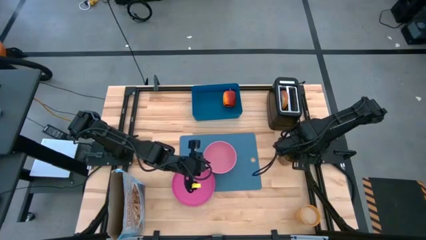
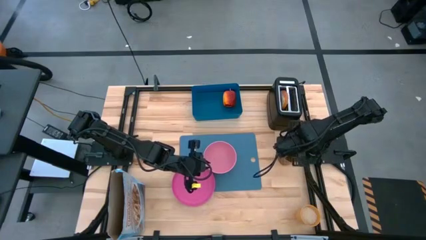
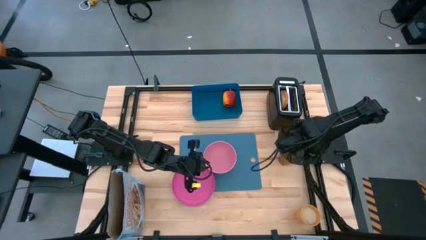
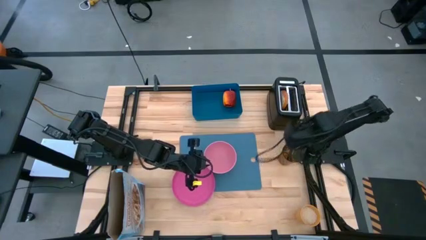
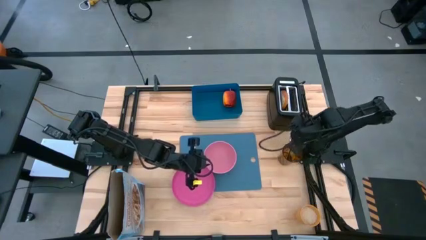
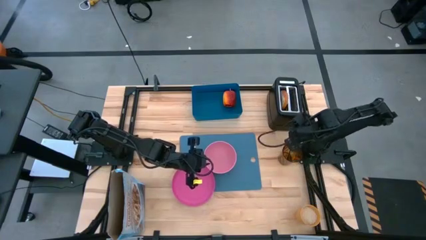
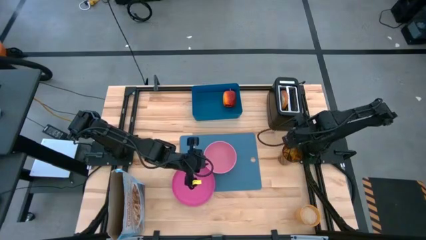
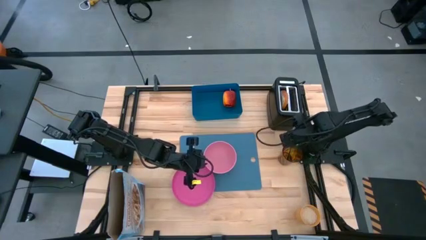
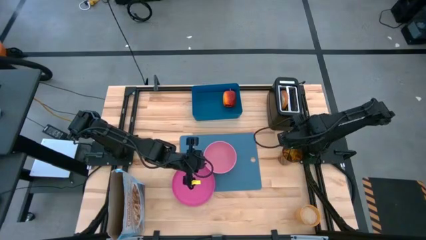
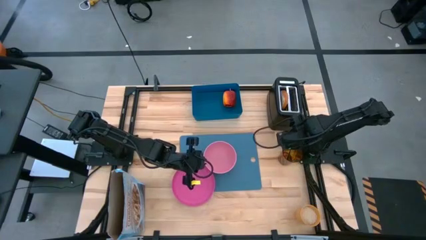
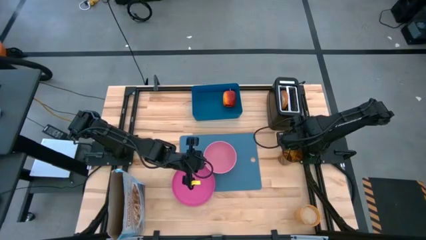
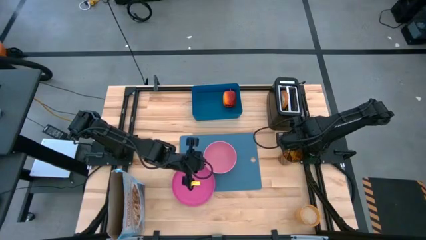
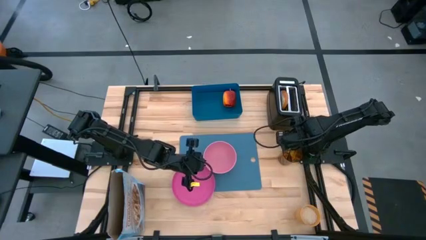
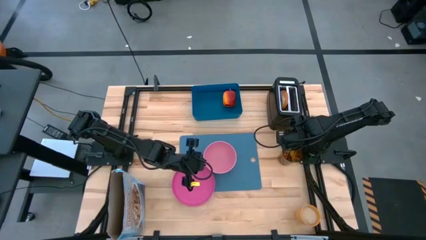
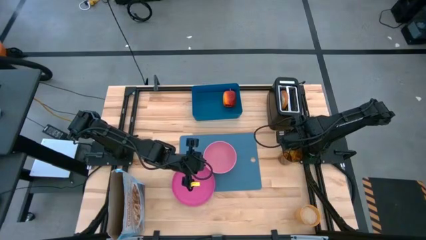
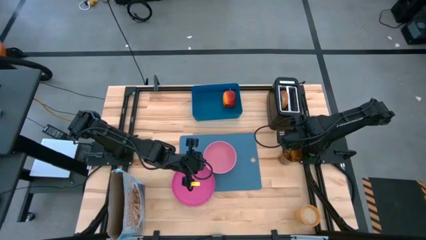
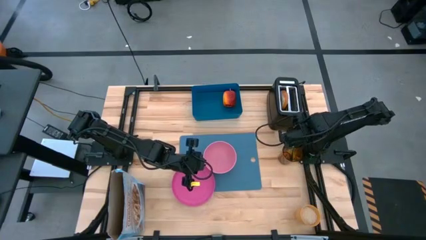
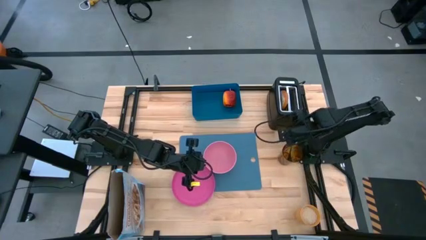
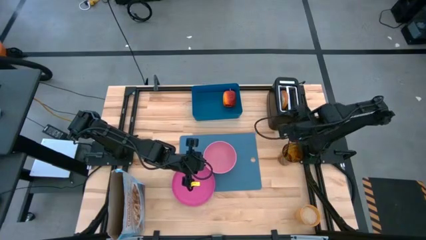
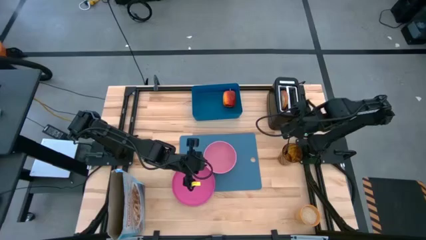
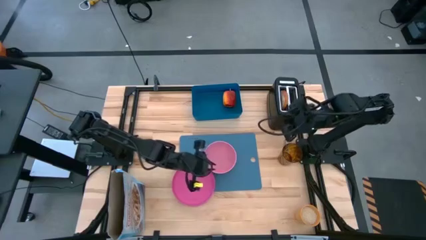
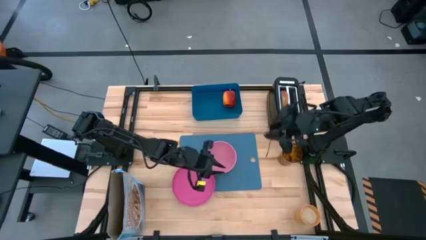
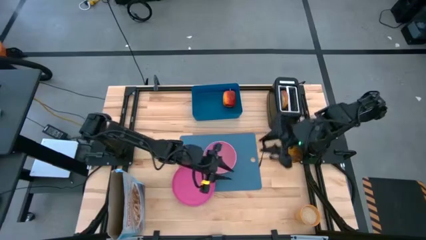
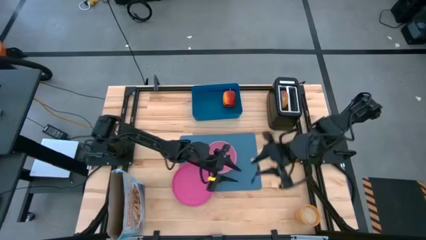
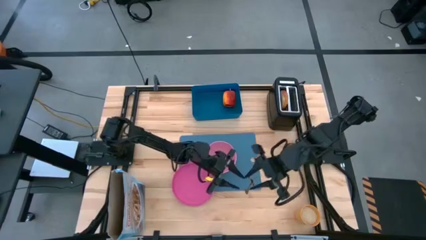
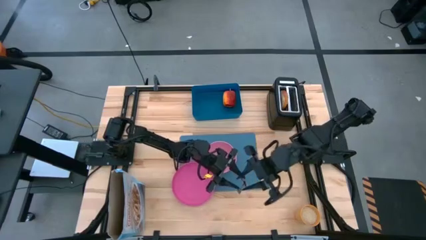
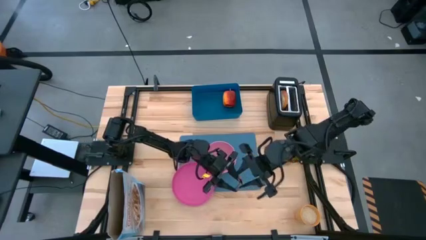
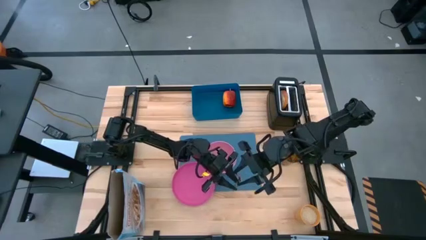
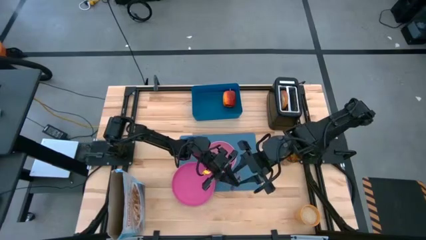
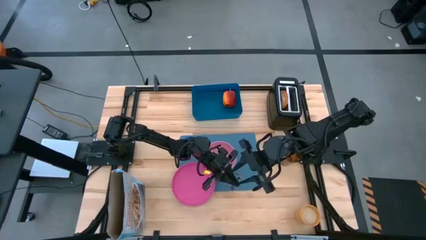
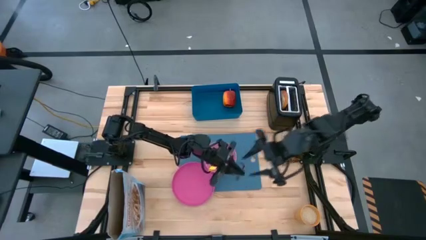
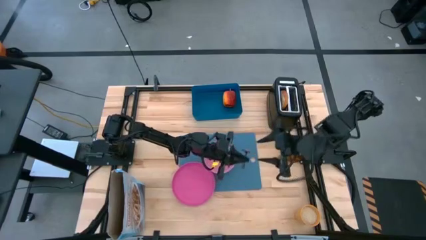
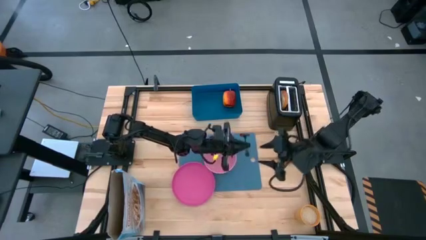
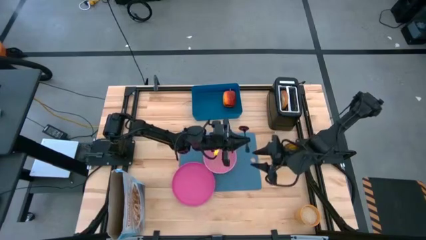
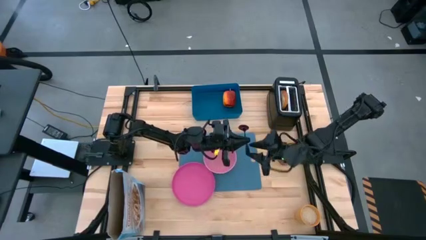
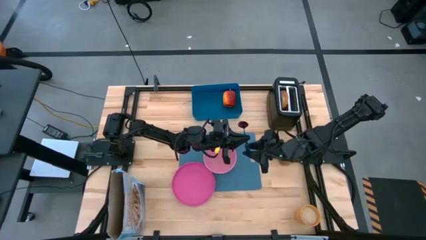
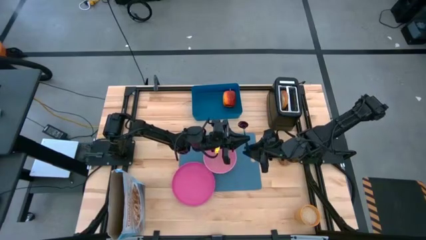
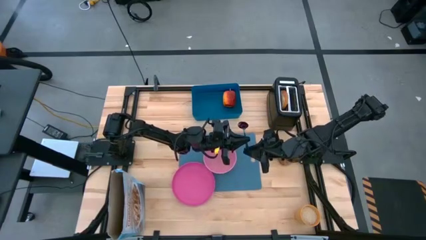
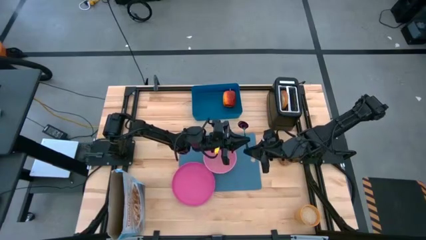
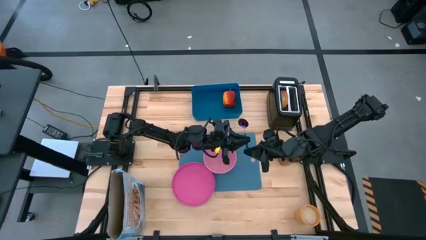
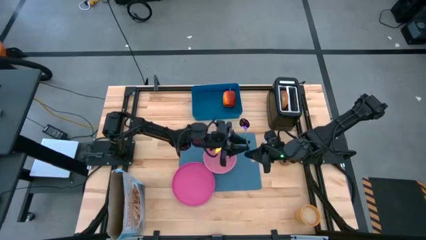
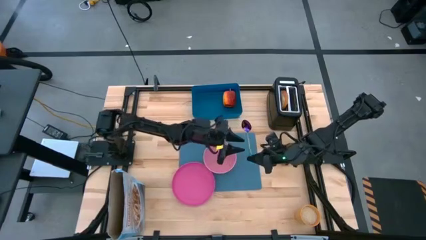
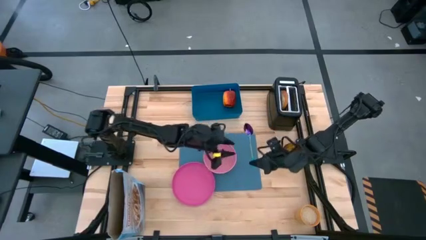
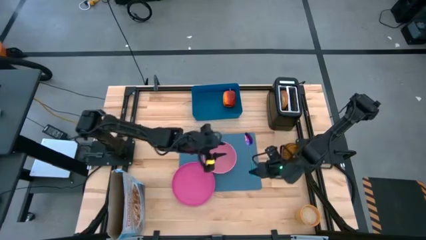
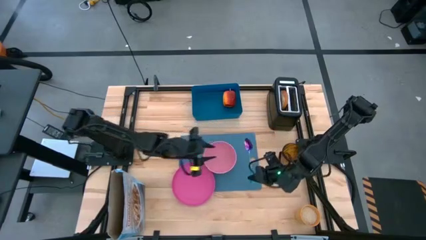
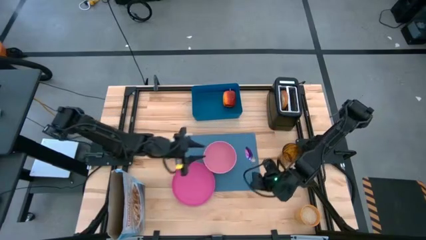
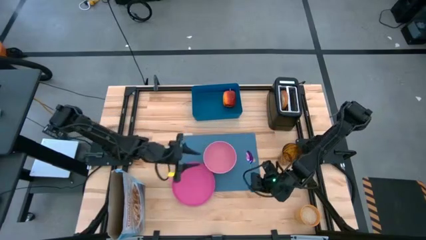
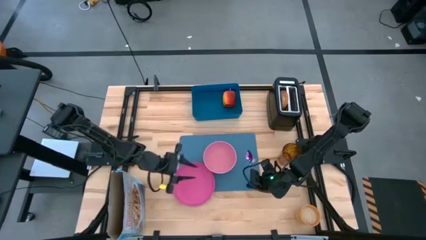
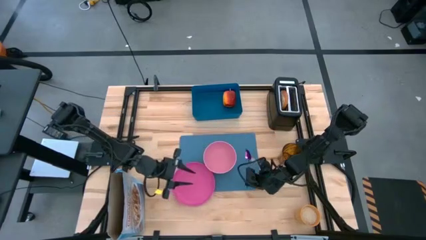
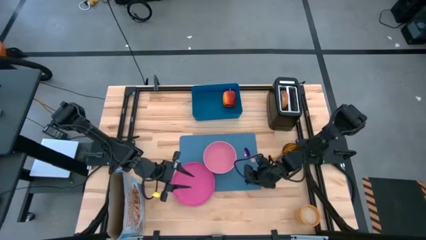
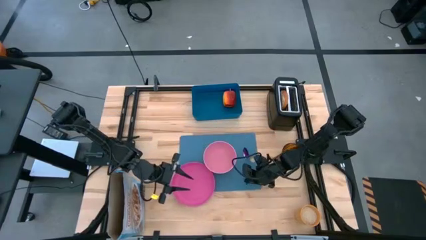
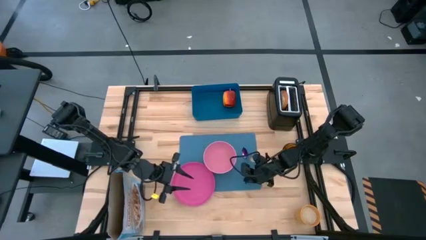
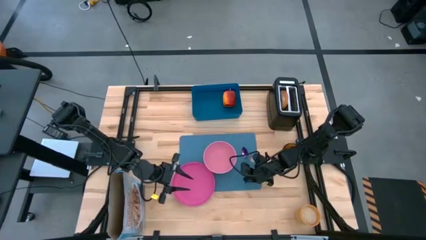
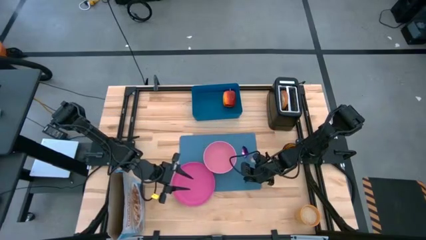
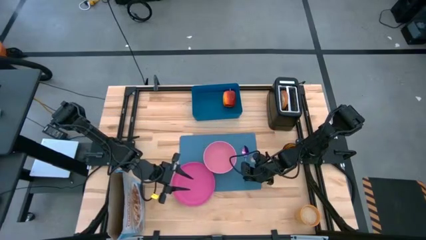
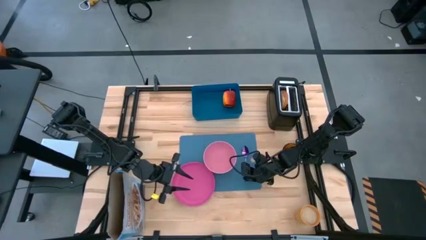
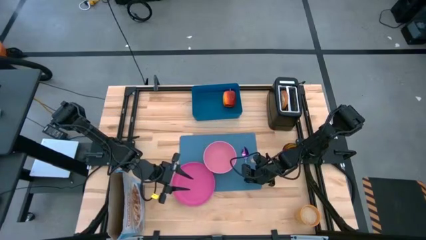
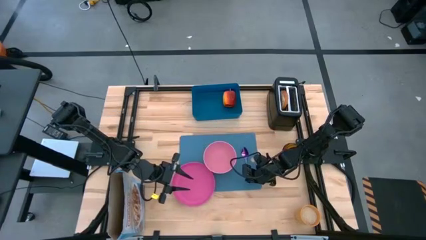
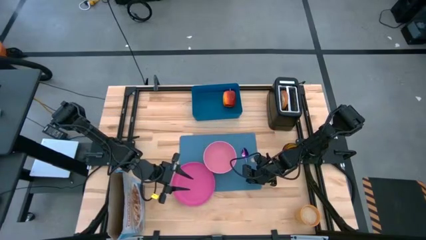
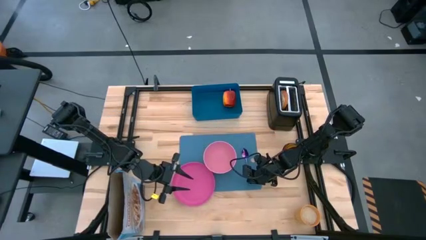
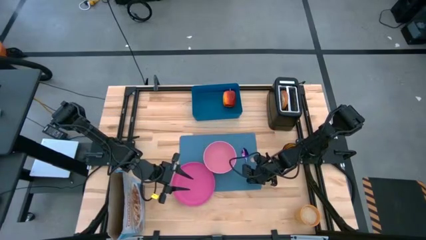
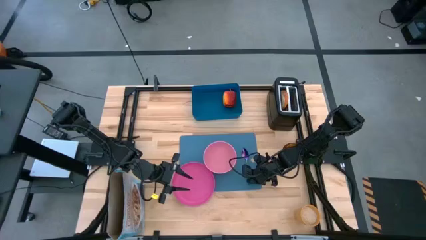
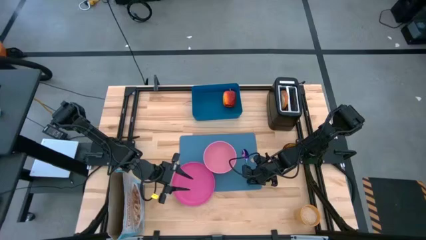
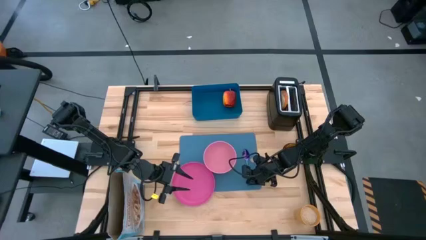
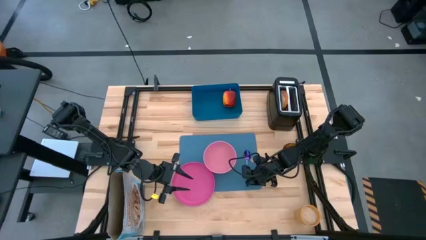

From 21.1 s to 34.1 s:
Task: Arrange a breakfast setting
Put the spoon to the right of the pink bowl on the blue table mat

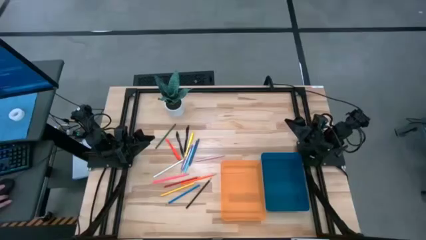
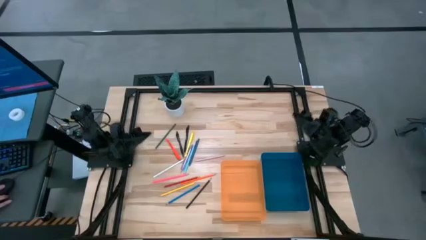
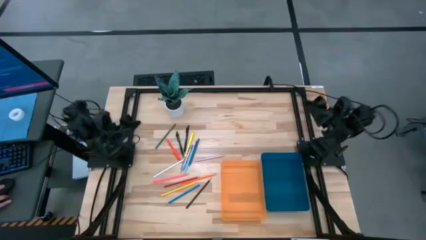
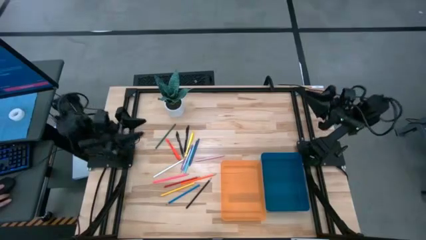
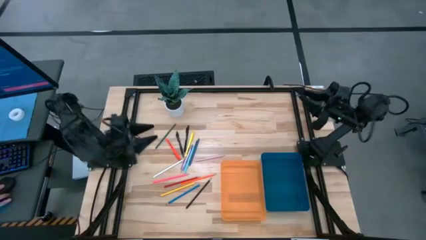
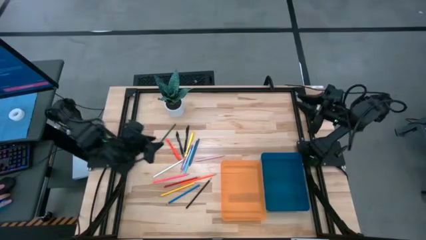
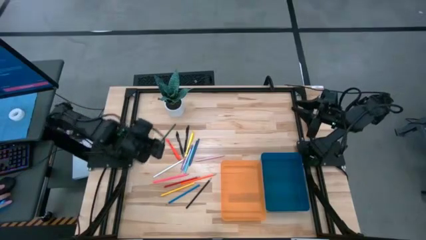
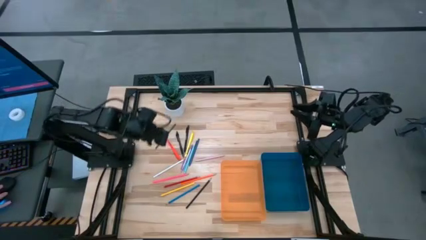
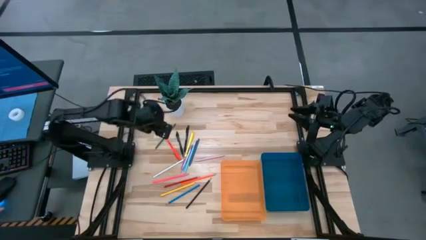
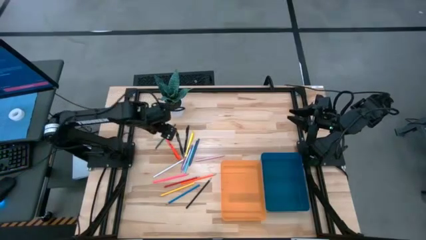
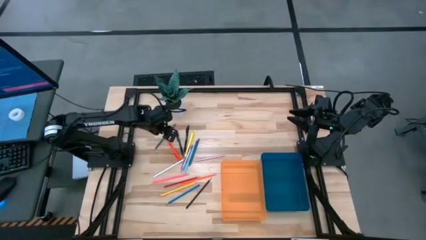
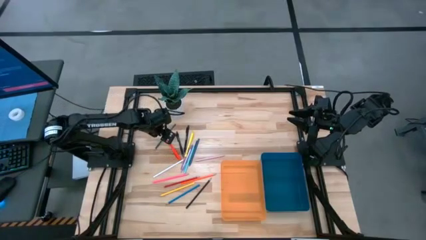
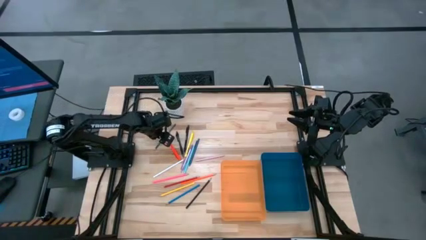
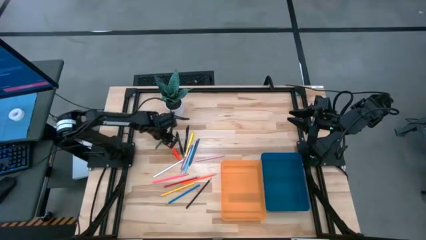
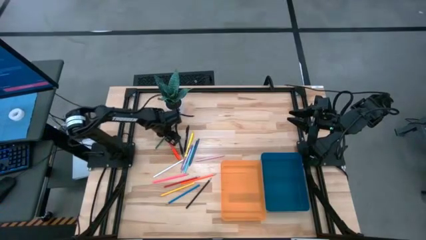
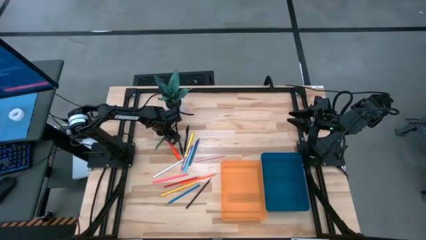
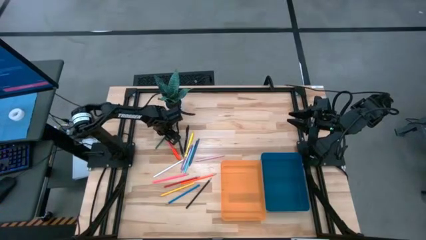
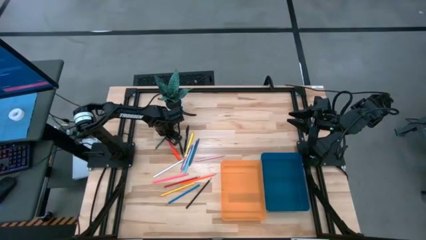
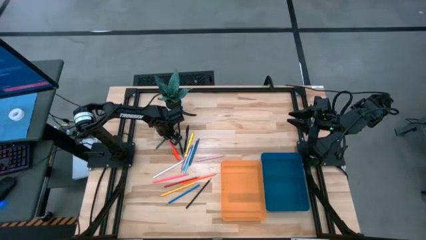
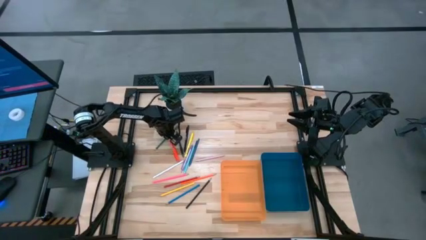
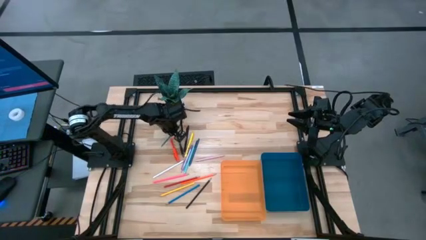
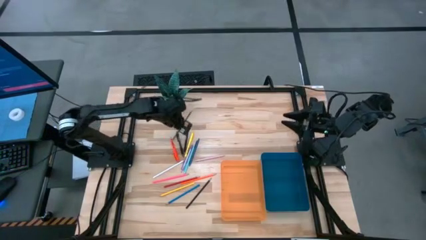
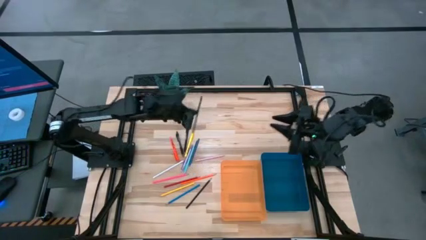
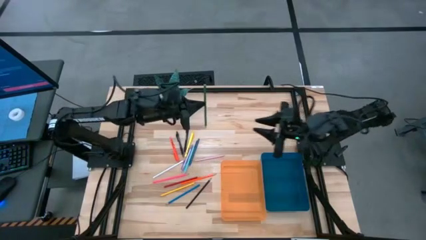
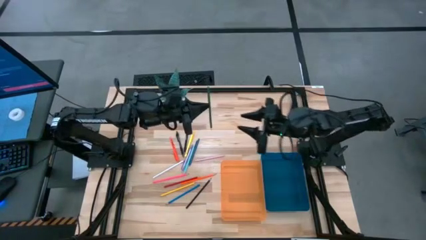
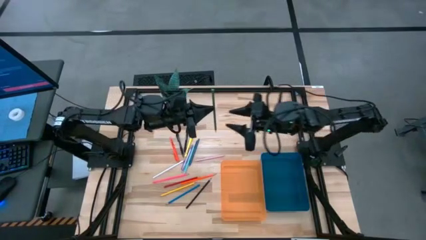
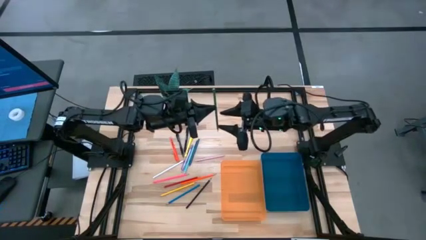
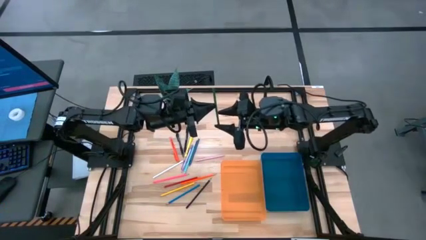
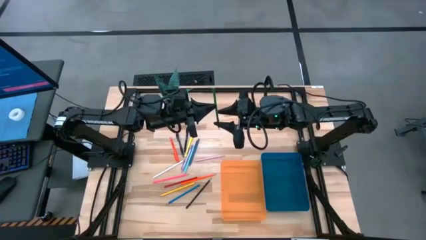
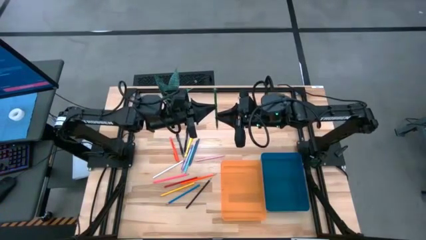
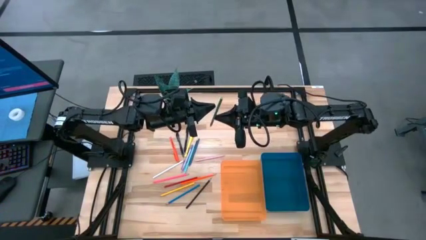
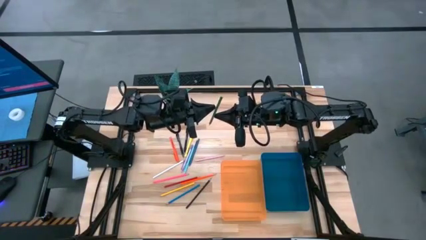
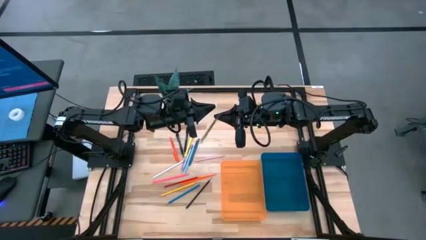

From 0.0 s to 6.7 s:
Task: Sort pens & pencils
Put the green pencil into the blue bin
